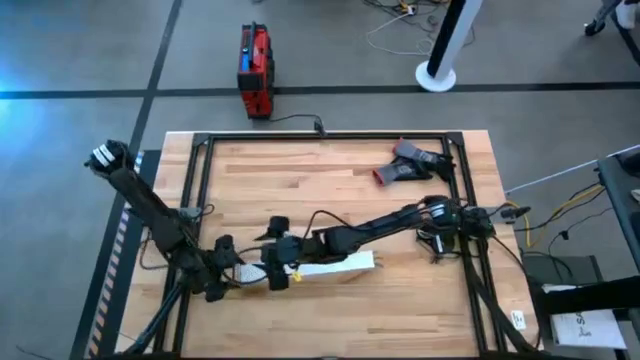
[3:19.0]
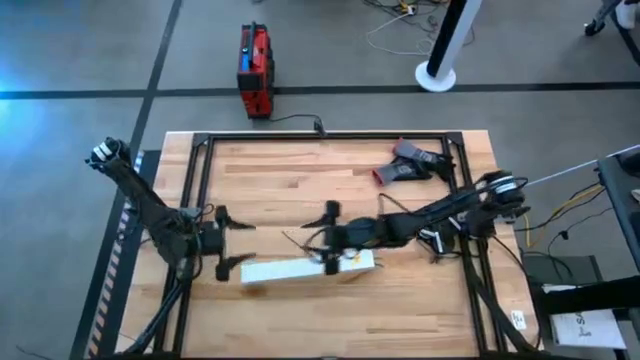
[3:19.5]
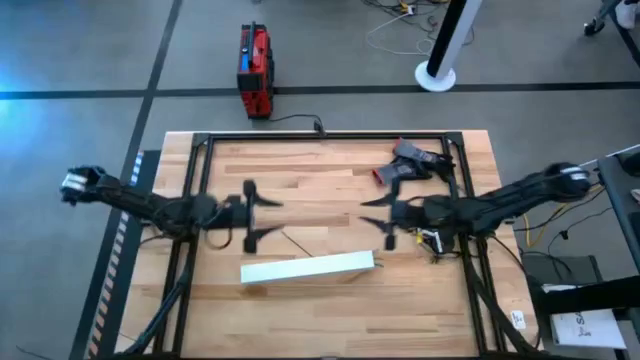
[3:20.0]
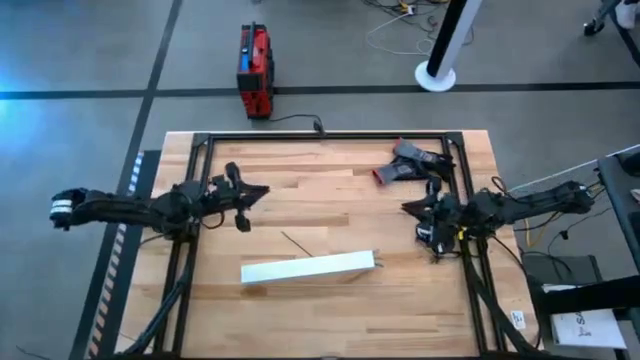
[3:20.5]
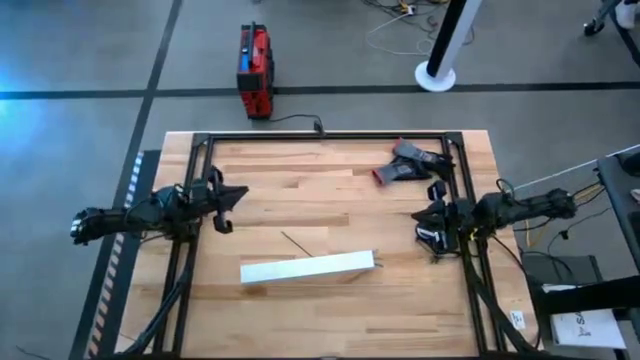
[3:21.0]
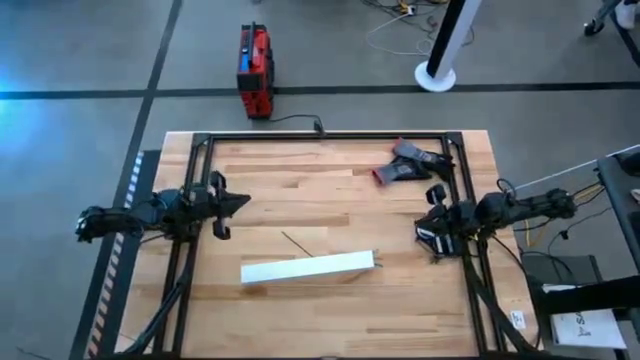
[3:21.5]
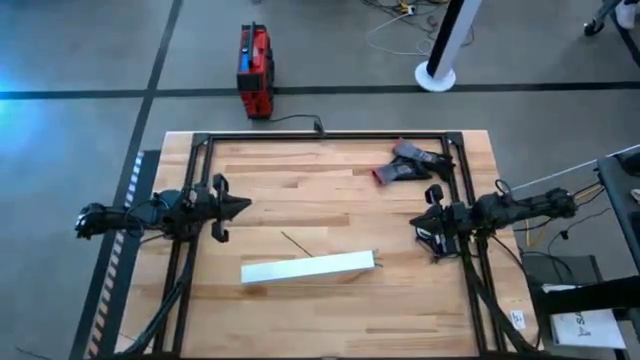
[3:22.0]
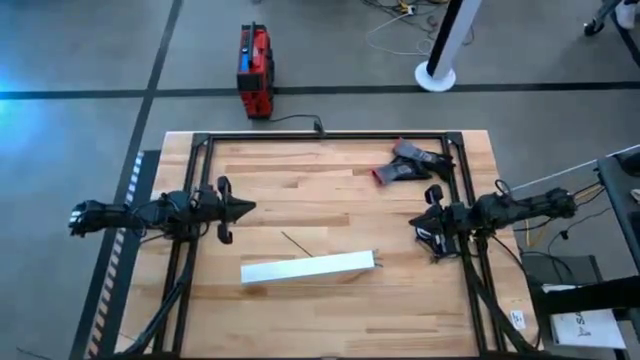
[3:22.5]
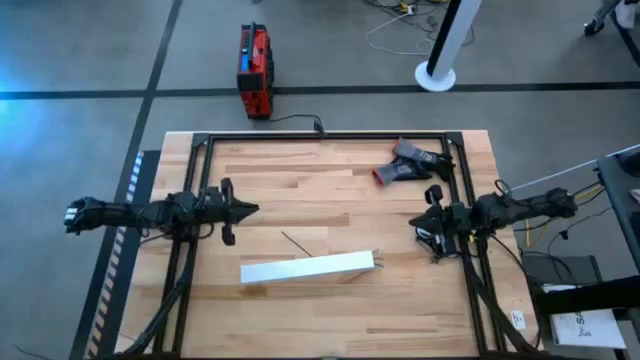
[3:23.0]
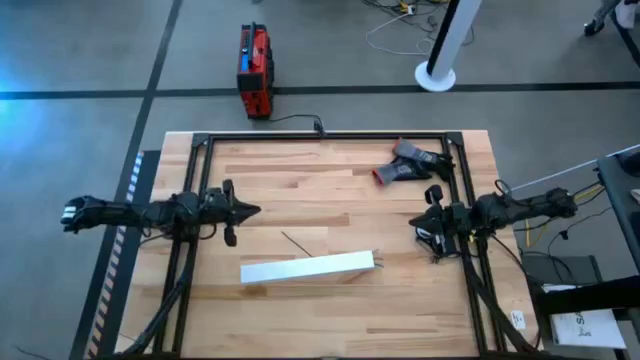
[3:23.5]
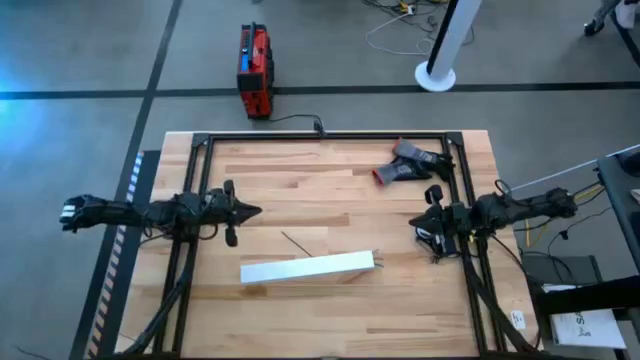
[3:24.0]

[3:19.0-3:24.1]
Task: Ziptie cables
Return to Home Position

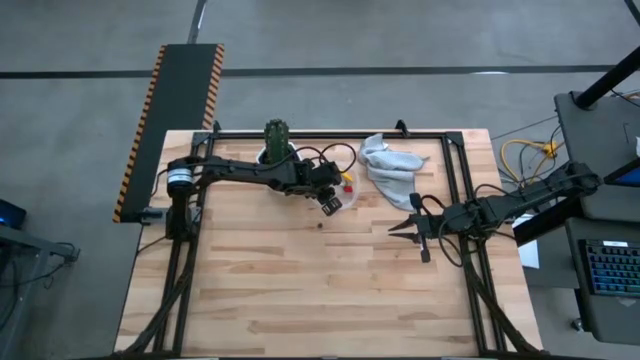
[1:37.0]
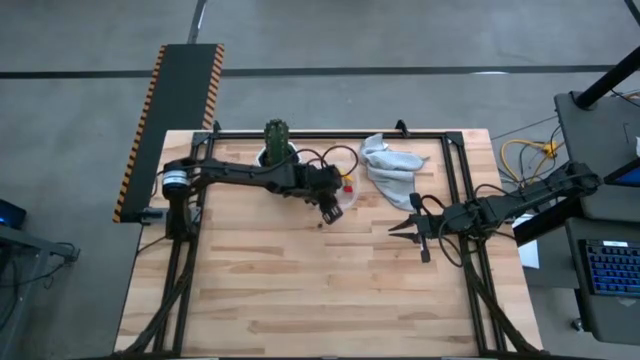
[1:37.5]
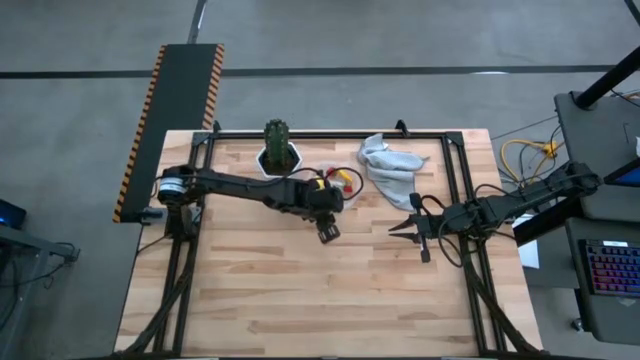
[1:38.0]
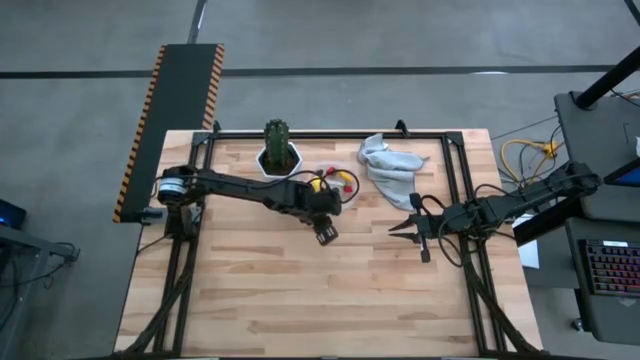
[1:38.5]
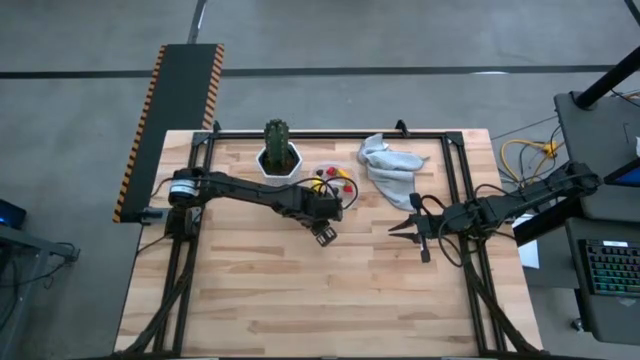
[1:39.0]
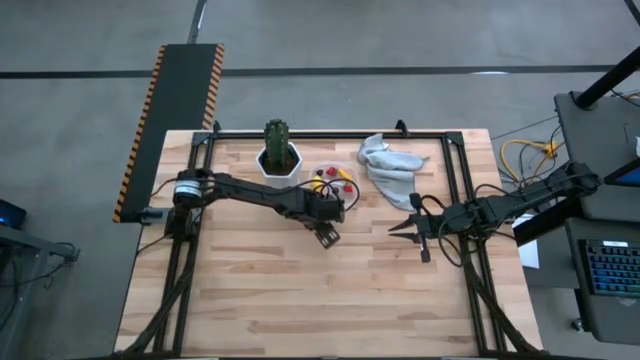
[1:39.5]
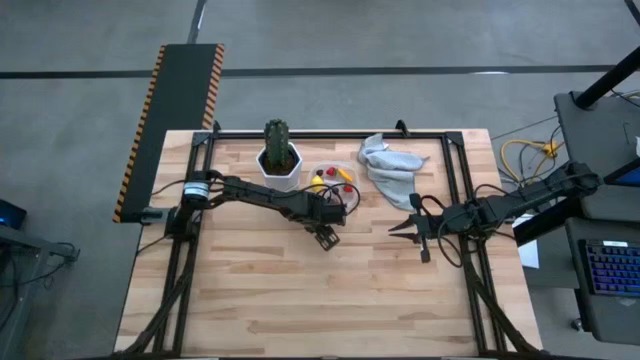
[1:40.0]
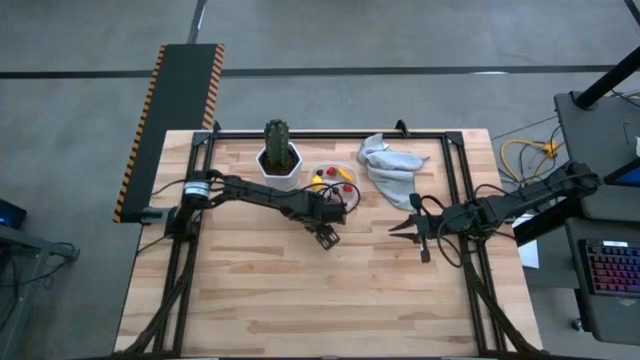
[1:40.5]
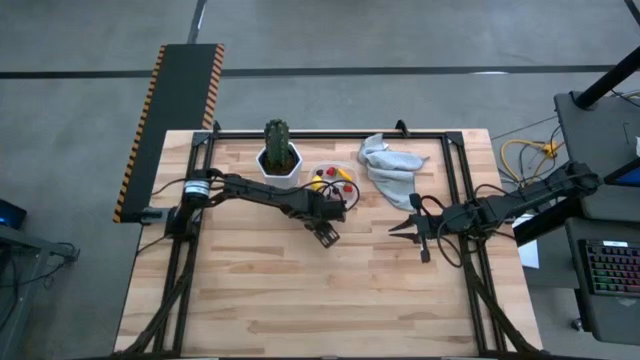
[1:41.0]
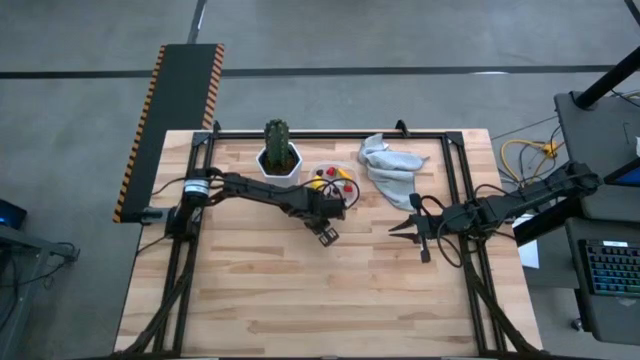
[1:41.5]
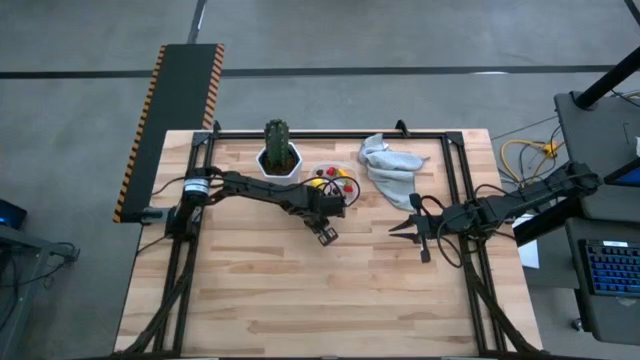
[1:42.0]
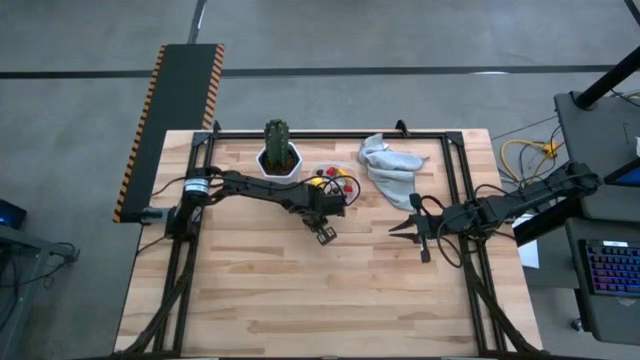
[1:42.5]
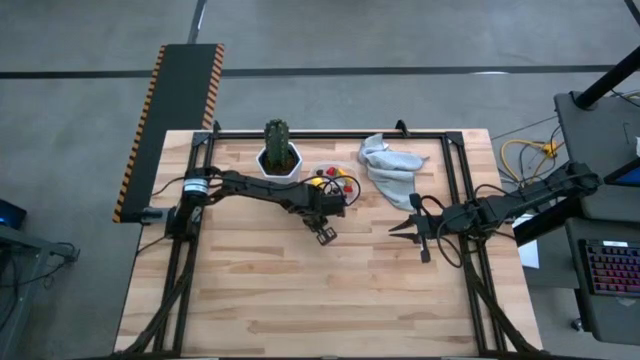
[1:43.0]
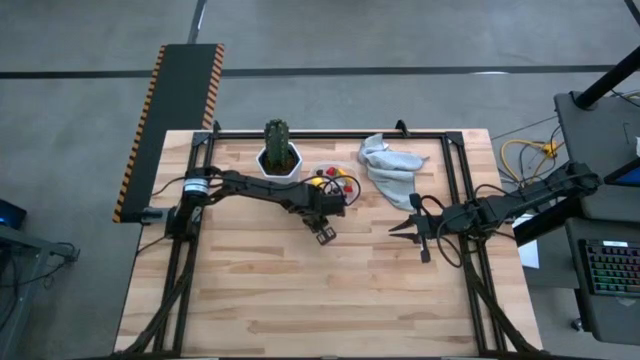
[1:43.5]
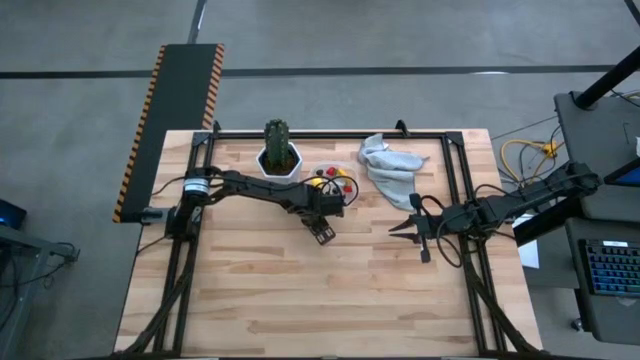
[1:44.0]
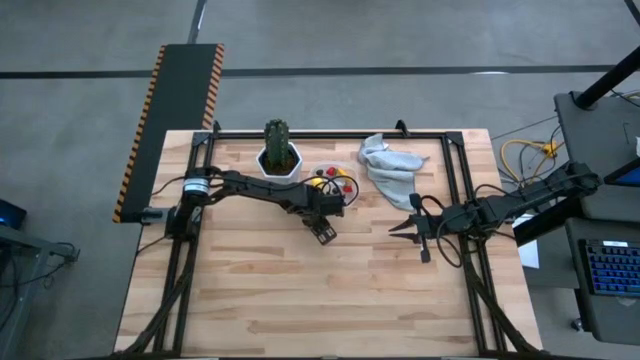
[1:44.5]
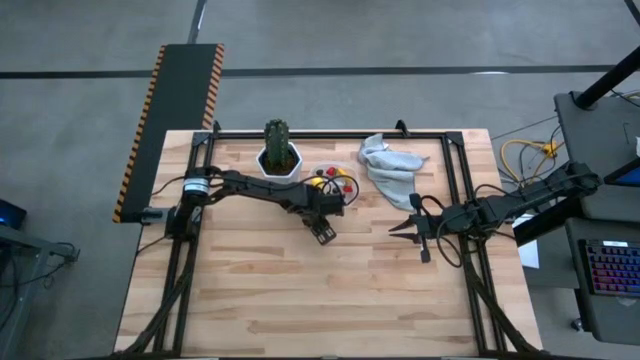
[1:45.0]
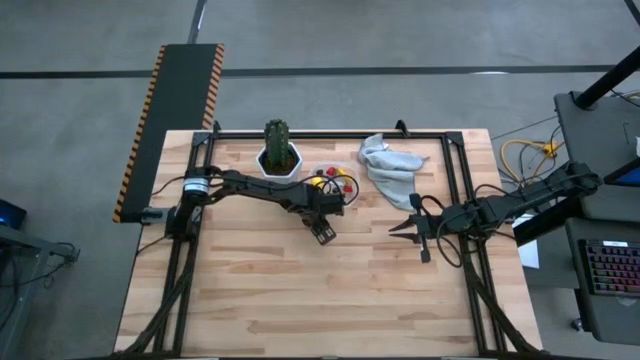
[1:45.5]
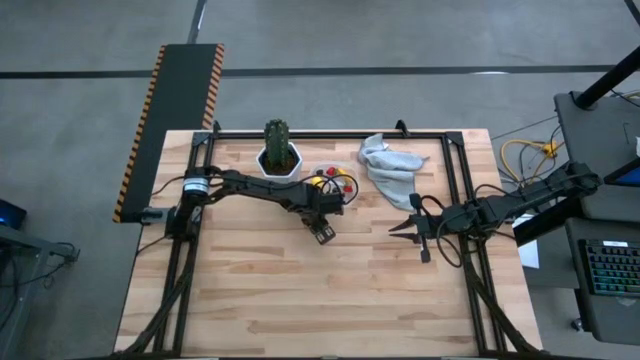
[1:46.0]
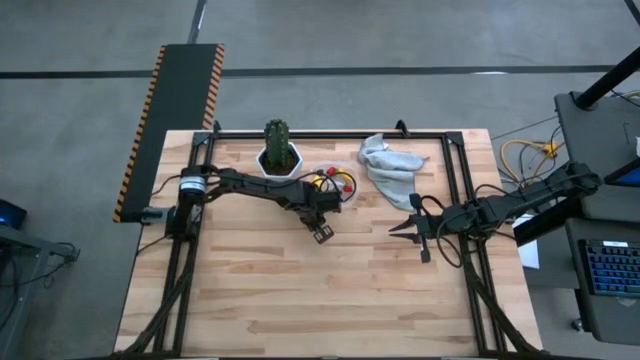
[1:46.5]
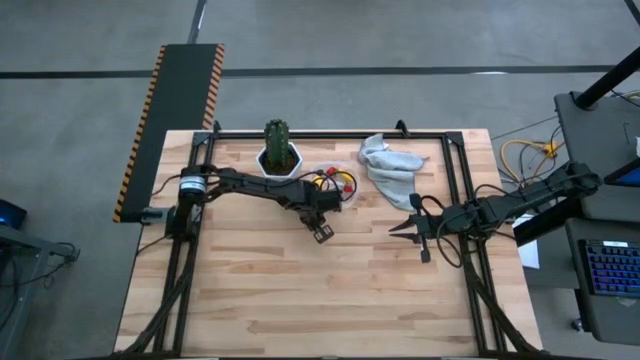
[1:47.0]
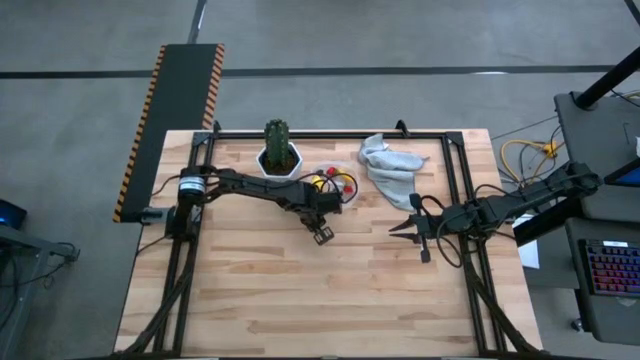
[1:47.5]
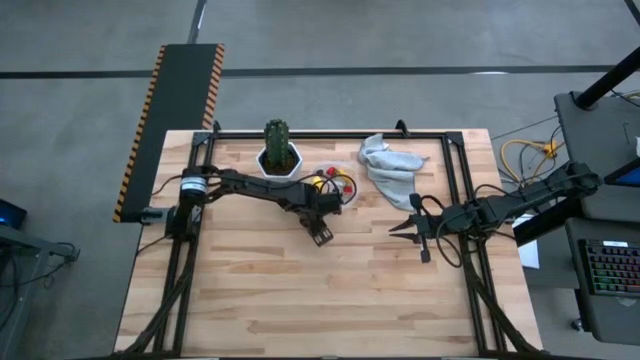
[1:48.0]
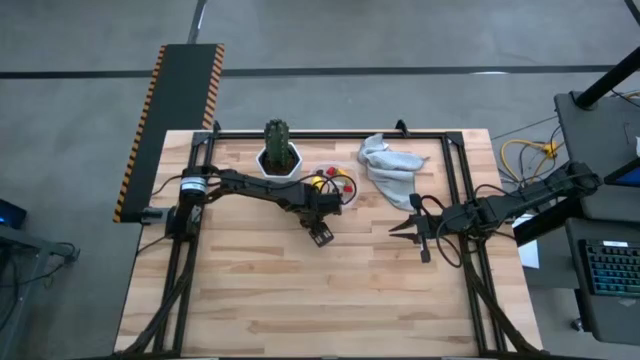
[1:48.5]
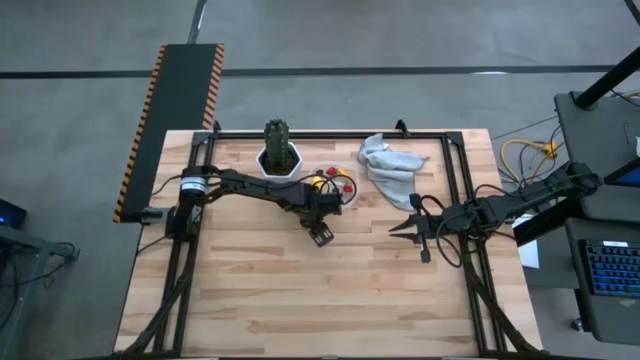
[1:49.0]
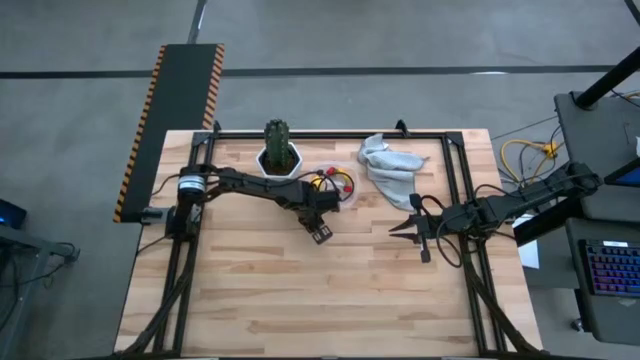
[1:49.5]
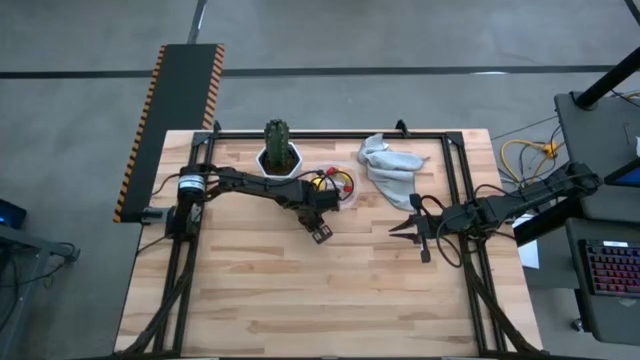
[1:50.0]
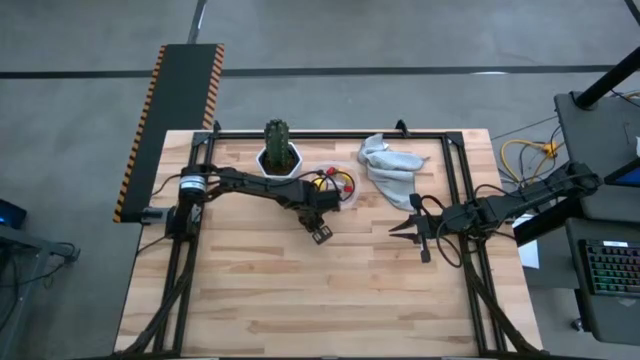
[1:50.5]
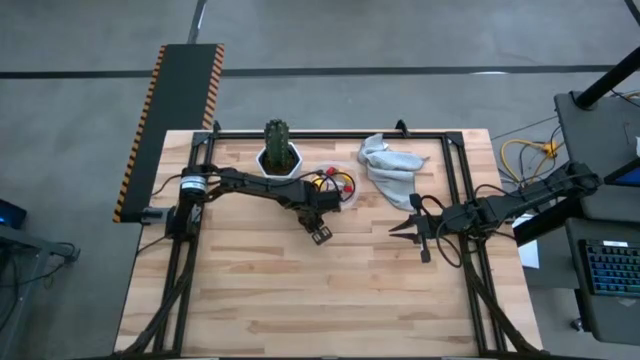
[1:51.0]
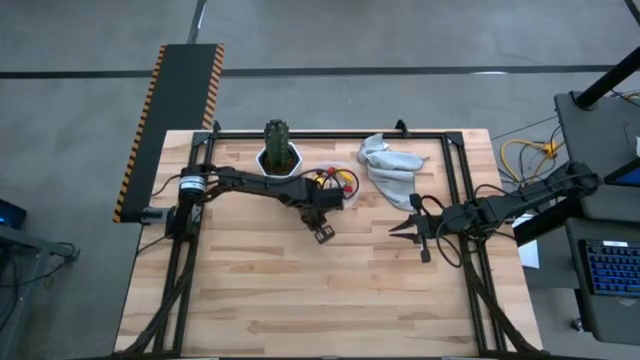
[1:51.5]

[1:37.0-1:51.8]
Task: Pick and placing Produce into tupperware
Put the blueberry into the transparent bin
